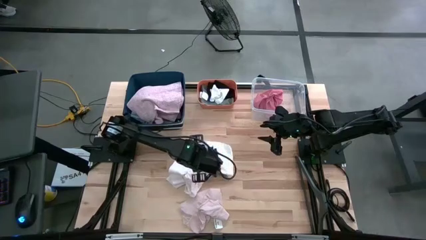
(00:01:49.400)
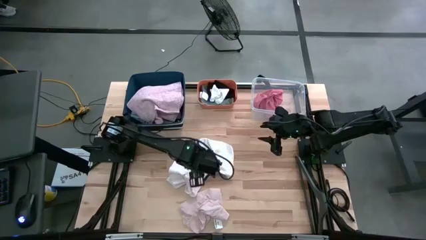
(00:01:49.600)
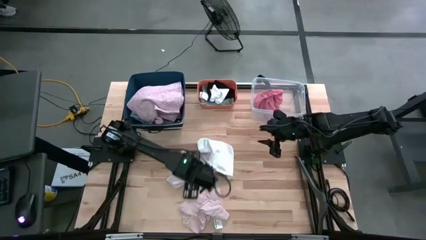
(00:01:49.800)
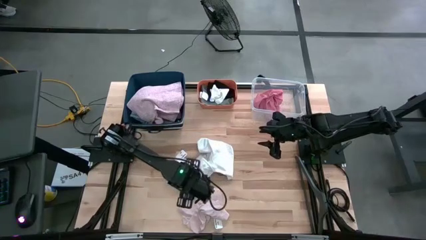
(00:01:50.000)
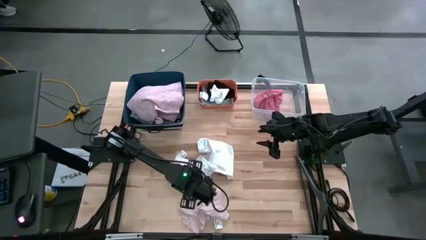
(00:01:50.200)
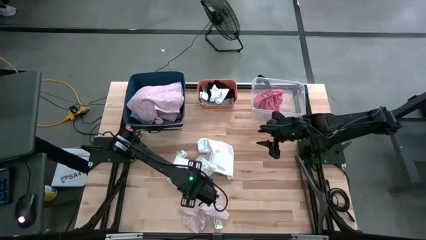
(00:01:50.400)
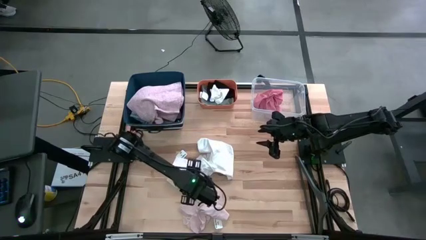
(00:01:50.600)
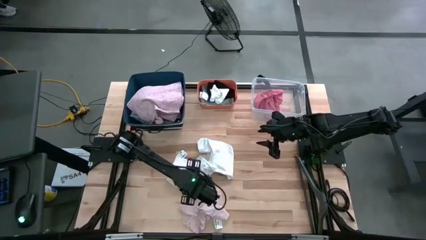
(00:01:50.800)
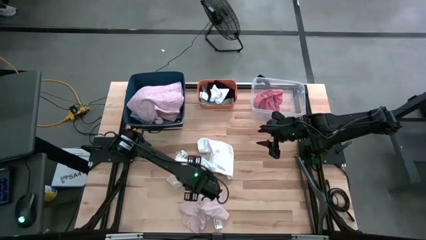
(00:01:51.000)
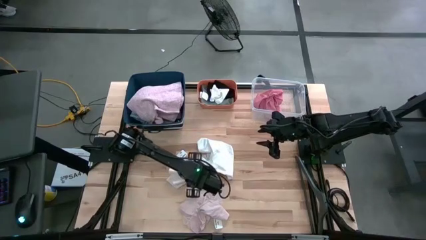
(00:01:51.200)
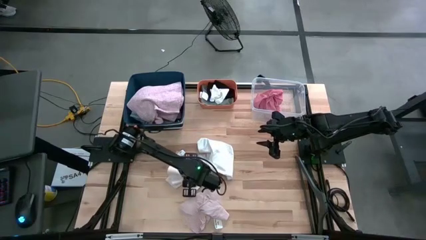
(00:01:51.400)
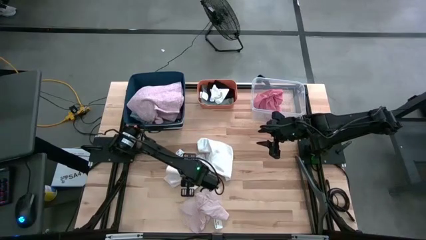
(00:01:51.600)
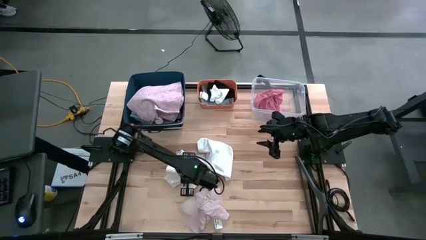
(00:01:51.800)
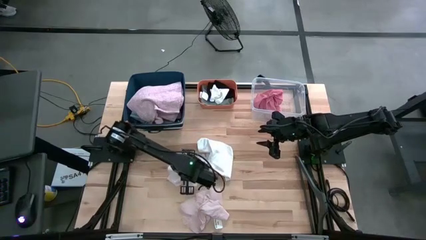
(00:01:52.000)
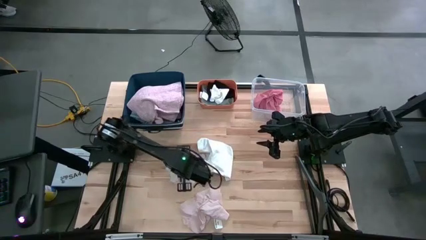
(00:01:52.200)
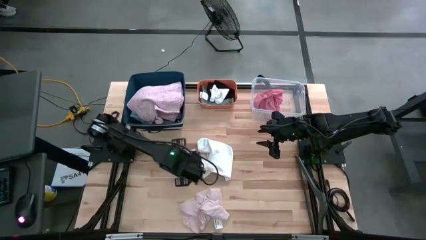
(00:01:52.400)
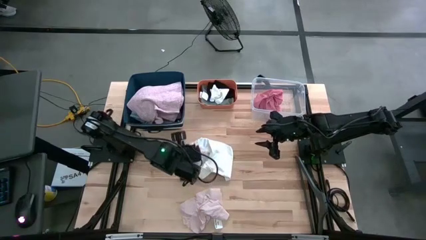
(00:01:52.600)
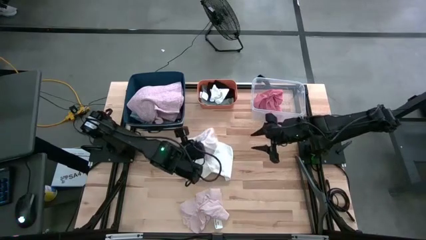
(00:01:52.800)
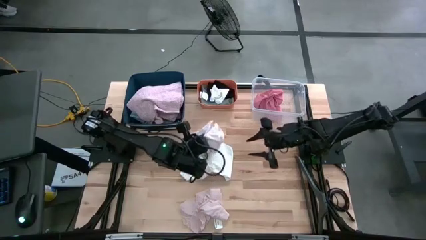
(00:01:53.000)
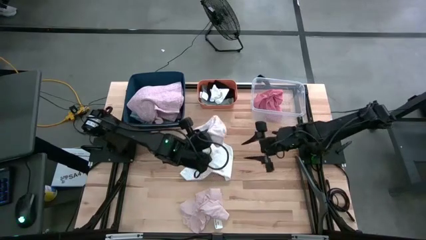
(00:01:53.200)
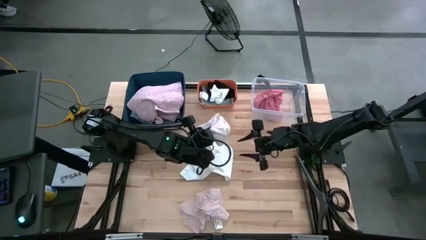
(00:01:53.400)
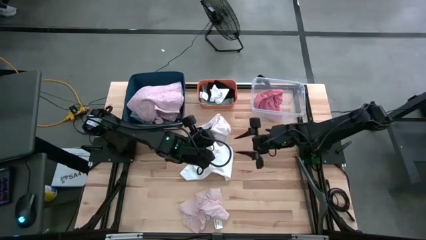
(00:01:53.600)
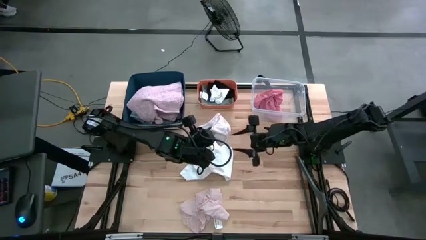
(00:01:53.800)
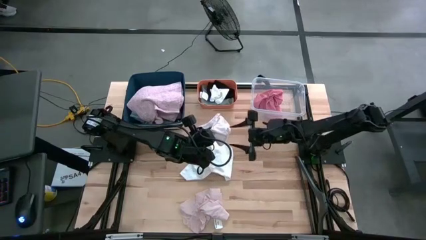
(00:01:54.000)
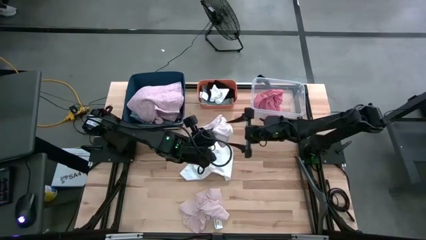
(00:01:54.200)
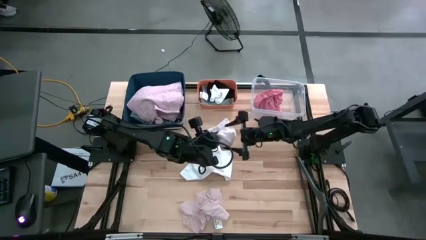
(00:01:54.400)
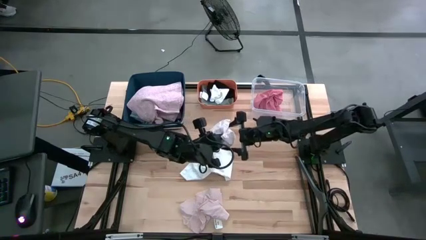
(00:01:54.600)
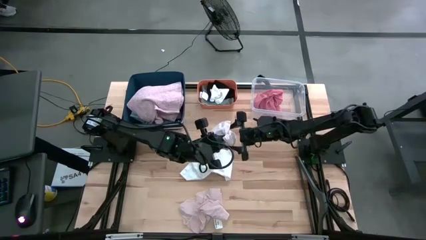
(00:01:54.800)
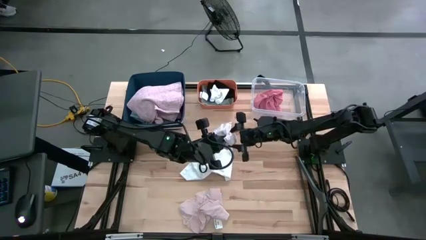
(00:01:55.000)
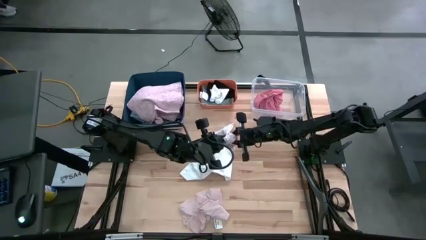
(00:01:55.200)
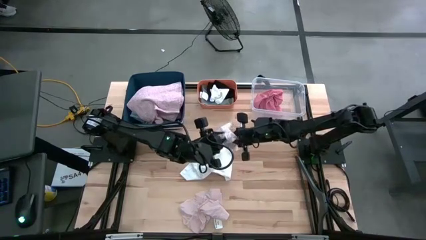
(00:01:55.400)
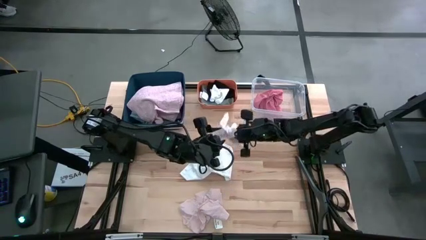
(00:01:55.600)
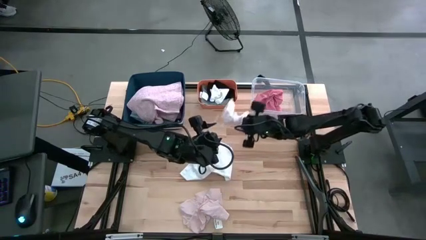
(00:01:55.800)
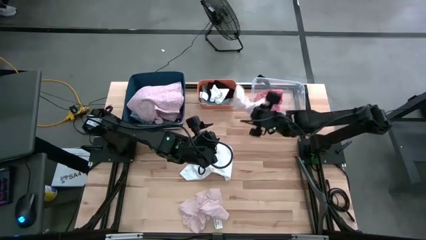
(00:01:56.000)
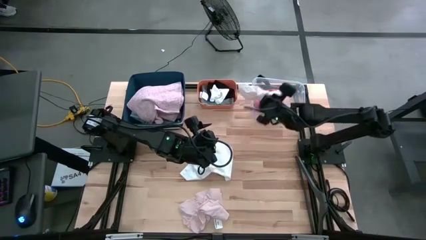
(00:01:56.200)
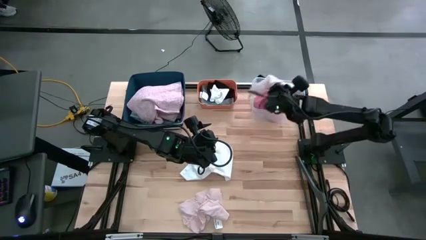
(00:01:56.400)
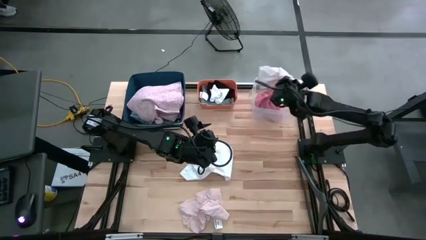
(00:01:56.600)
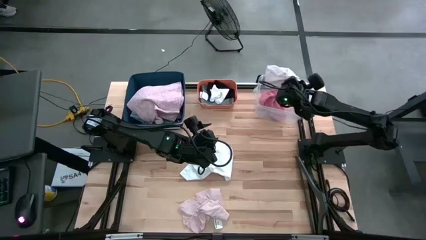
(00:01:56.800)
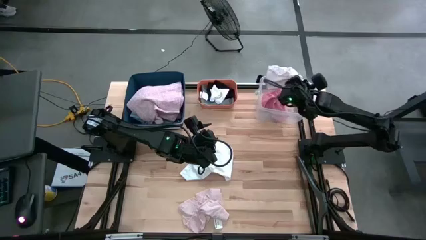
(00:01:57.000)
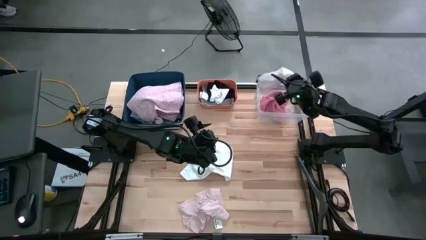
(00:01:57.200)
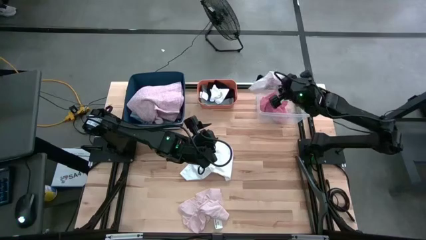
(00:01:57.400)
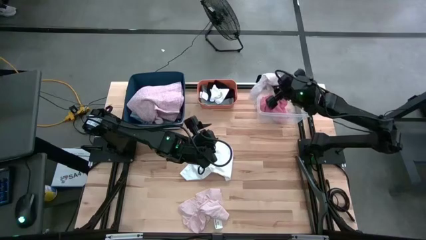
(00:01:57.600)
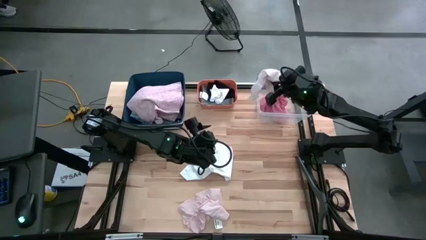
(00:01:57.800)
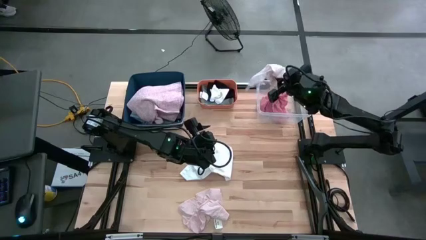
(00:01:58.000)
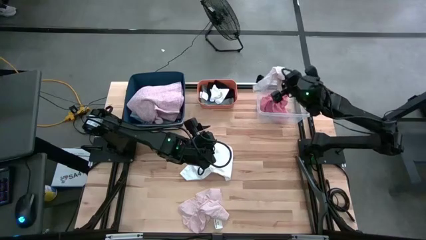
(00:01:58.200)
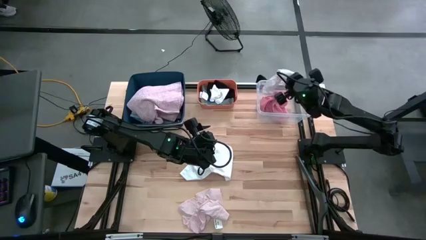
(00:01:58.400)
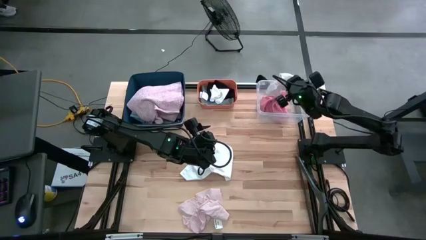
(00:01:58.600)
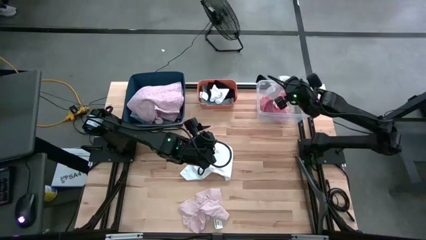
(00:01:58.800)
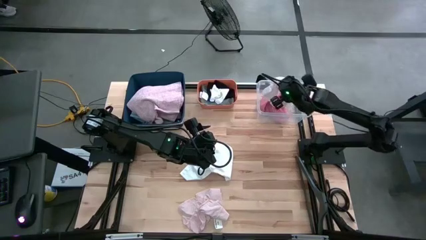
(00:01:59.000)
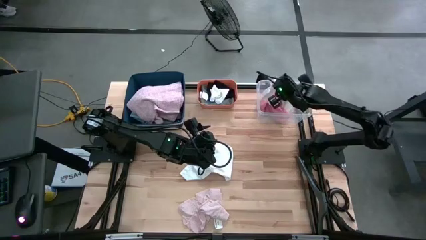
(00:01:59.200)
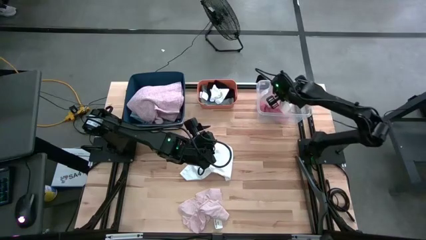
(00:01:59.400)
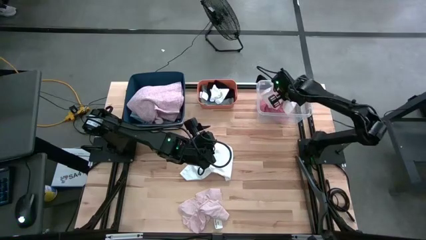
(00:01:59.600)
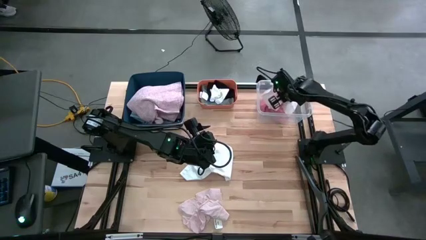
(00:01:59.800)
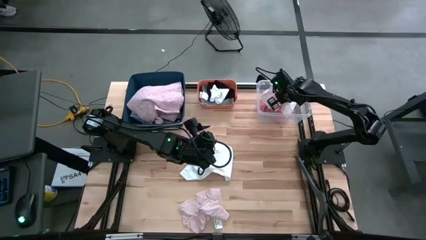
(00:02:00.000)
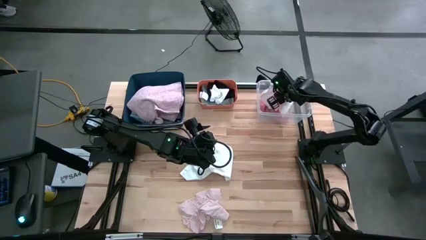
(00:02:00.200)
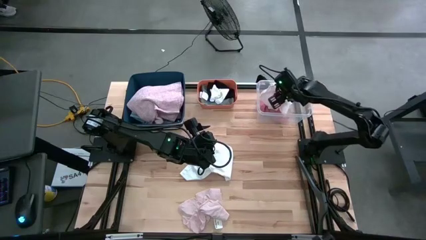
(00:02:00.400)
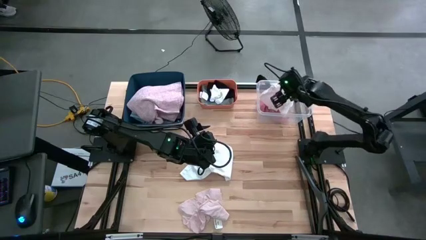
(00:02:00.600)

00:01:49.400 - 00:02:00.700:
Task: Pick & Place Cloths
Put the light pink underwear into the transparent bin
